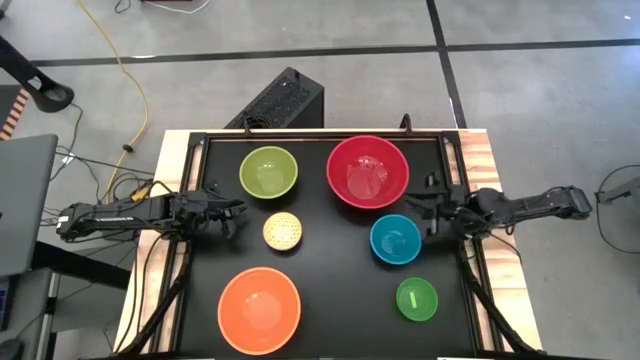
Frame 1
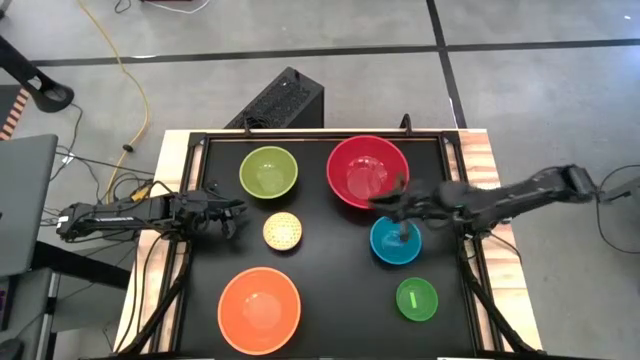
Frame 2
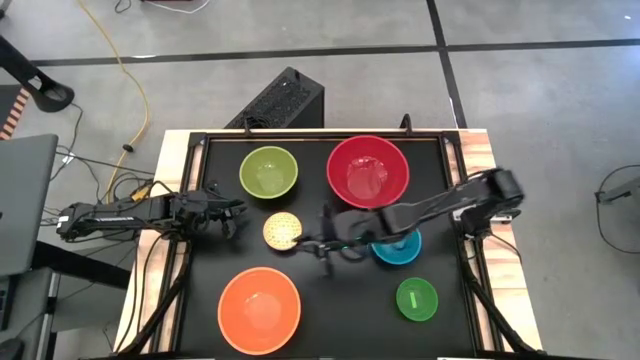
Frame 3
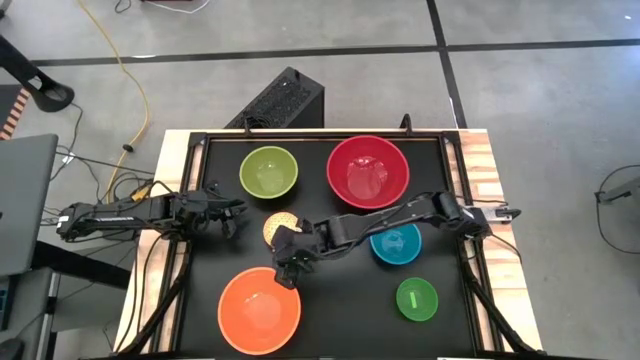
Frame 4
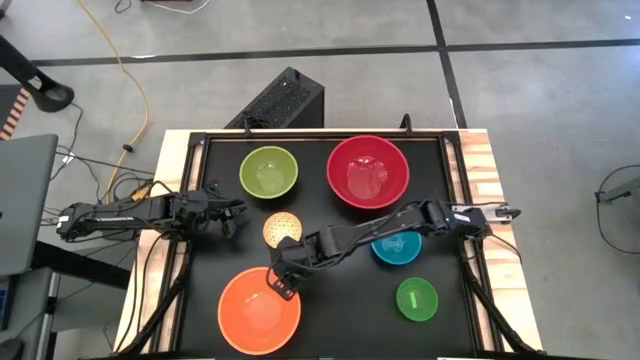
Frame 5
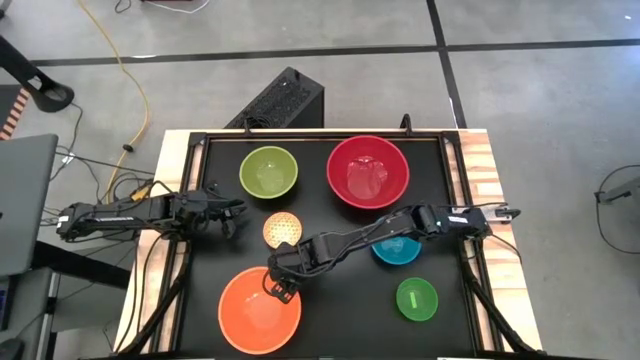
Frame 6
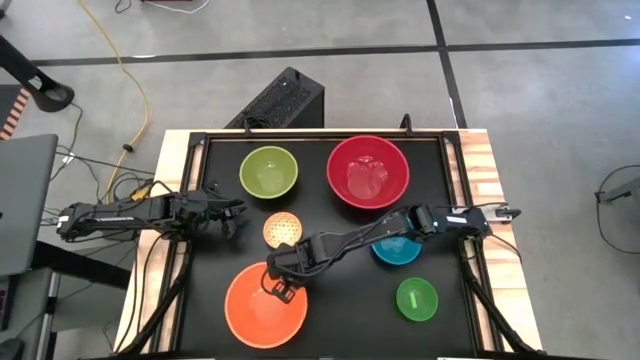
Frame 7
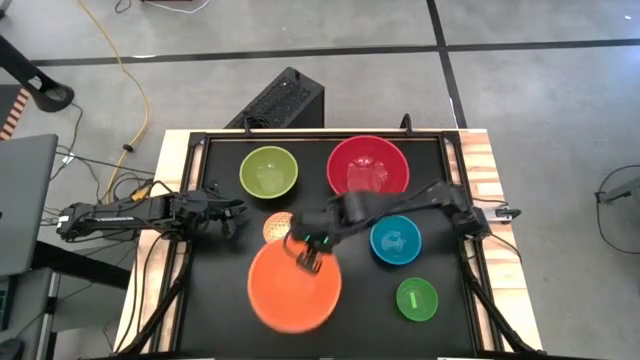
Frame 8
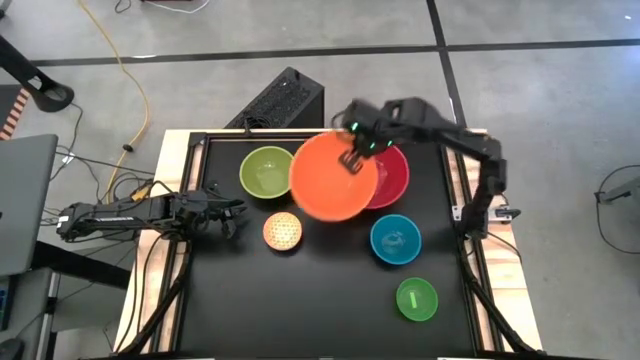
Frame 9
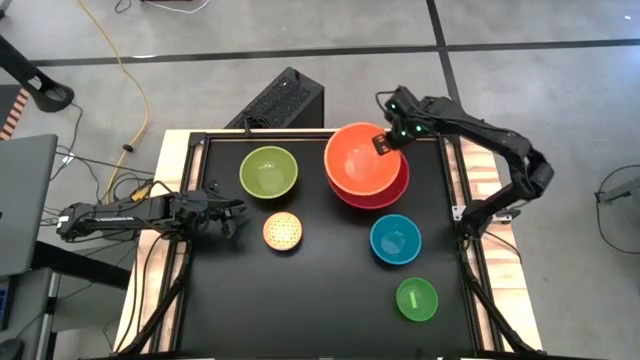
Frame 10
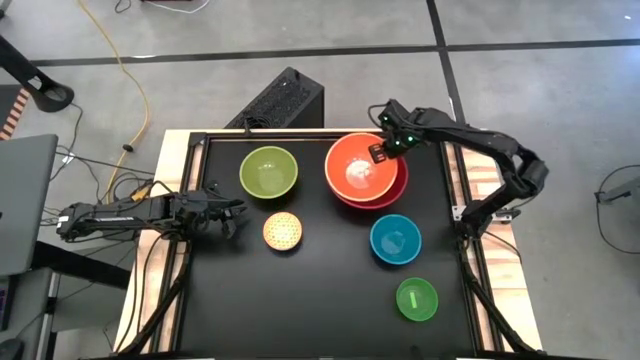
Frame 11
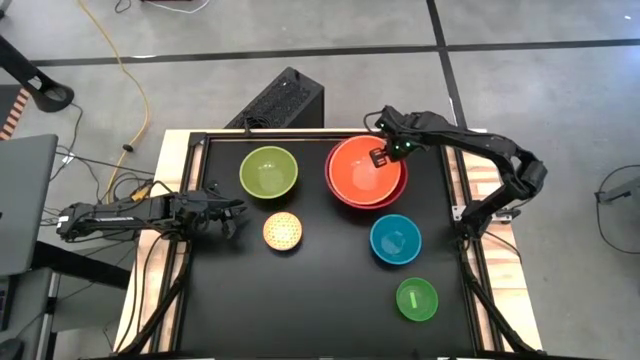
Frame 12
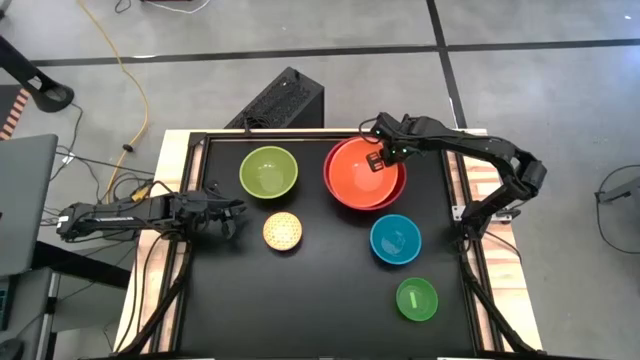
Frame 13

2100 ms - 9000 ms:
Stack the orange bowl on the red bowl

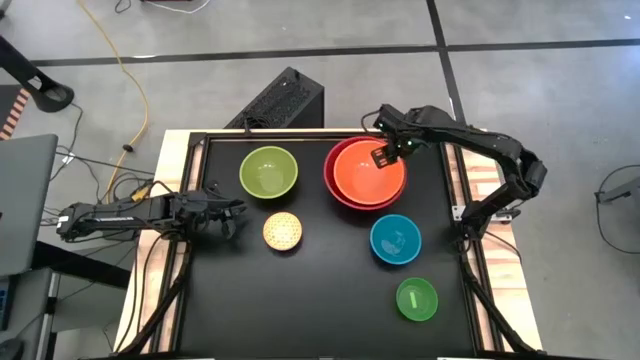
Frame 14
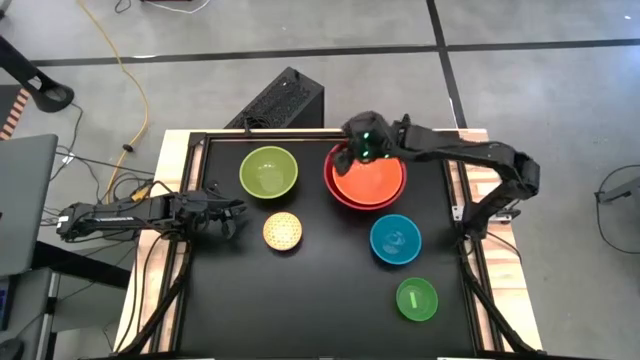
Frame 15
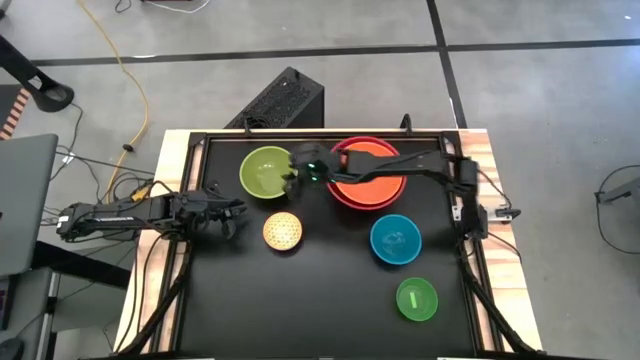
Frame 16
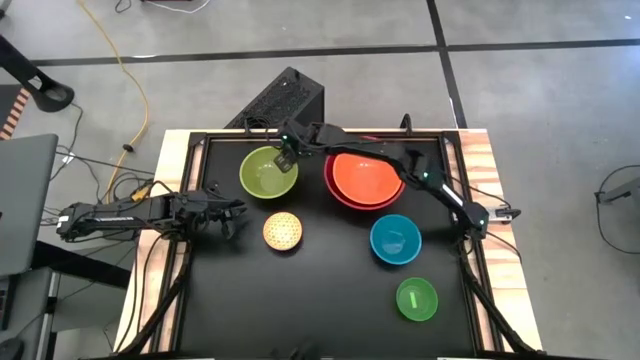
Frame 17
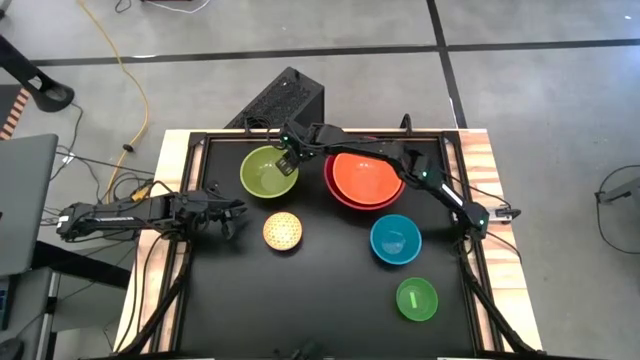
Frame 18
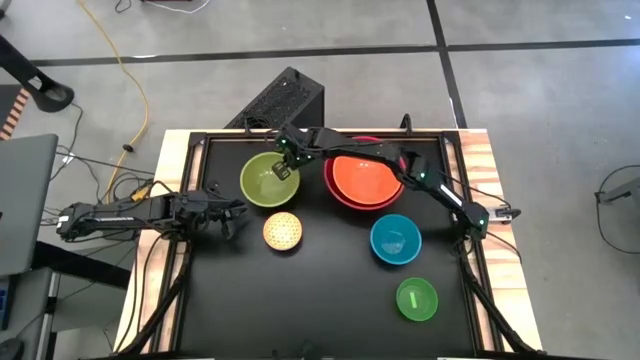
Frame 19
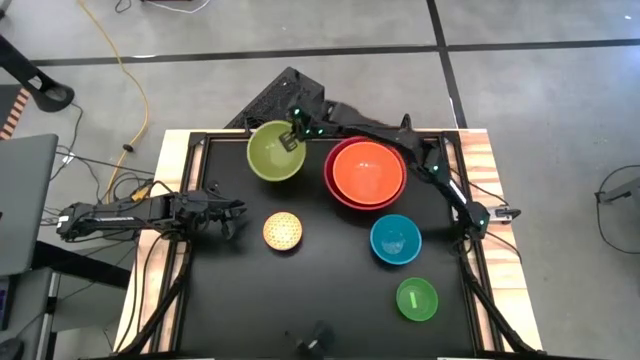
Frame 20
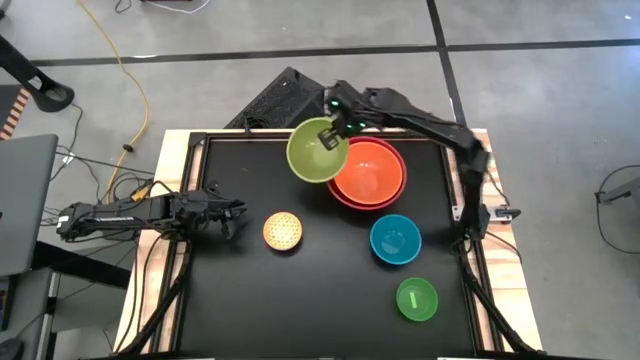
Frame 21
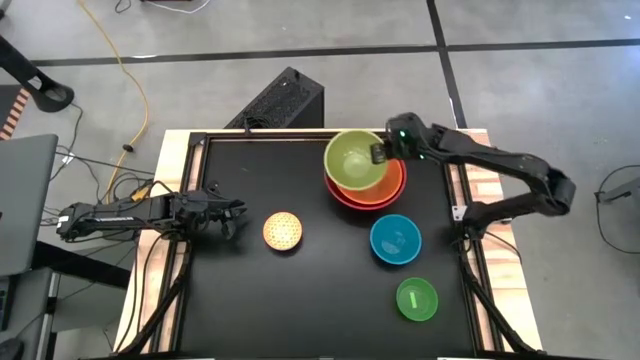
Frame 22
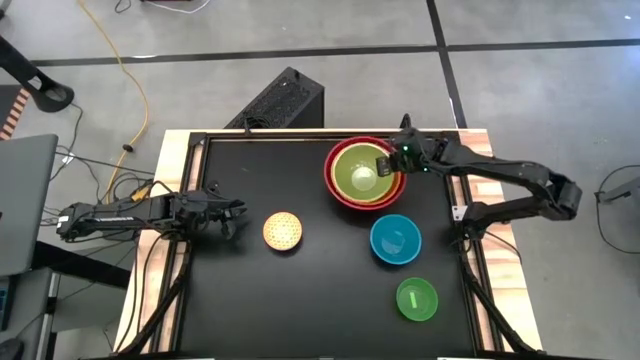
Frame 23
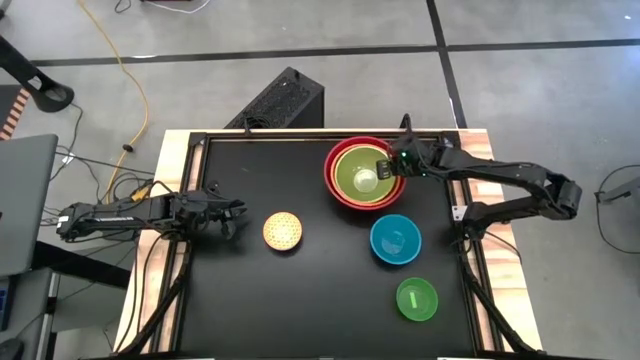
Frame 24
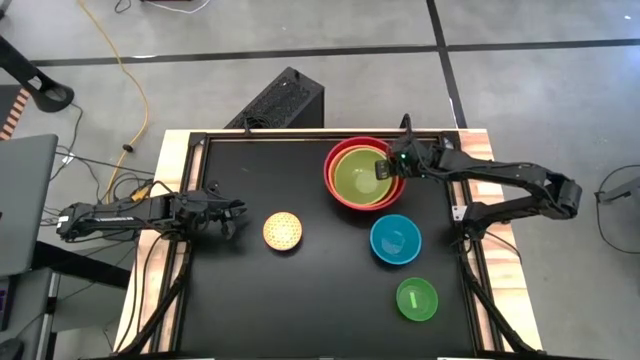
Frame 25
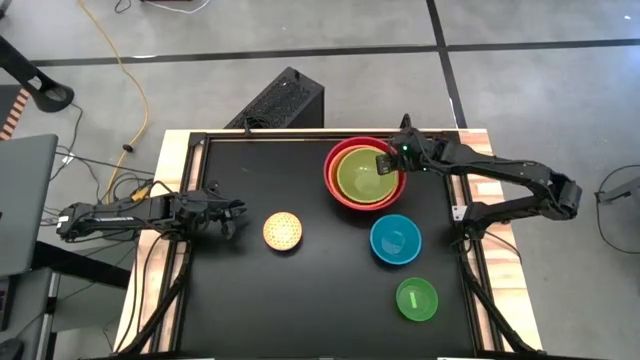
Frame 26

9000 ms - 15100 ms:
Stack the light green bowl on the orange bowl

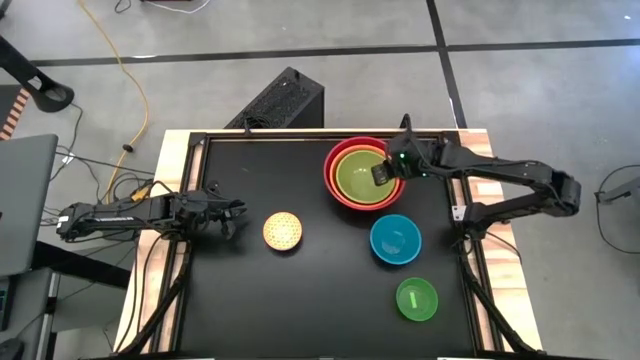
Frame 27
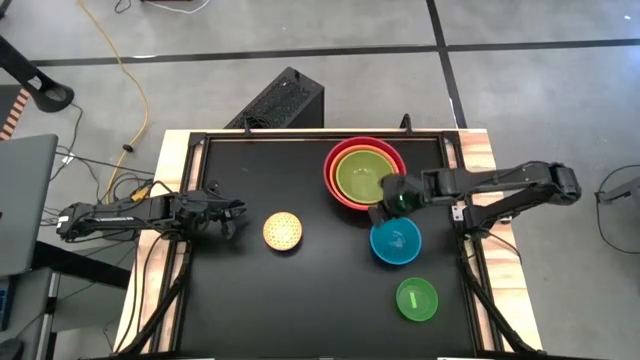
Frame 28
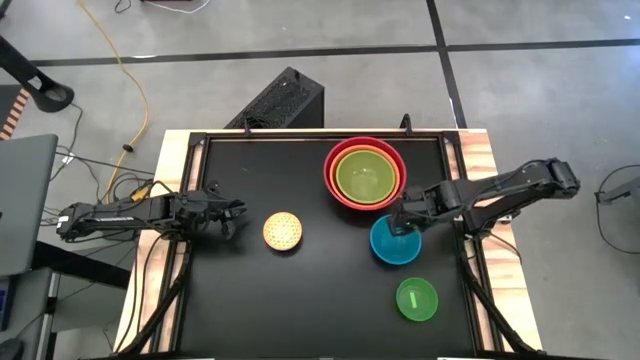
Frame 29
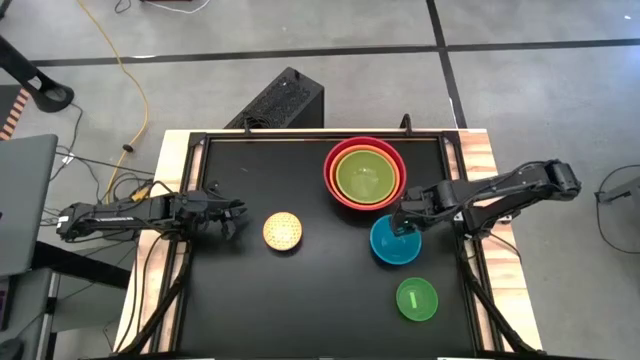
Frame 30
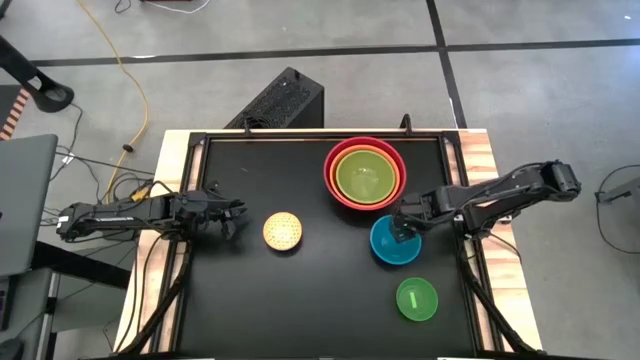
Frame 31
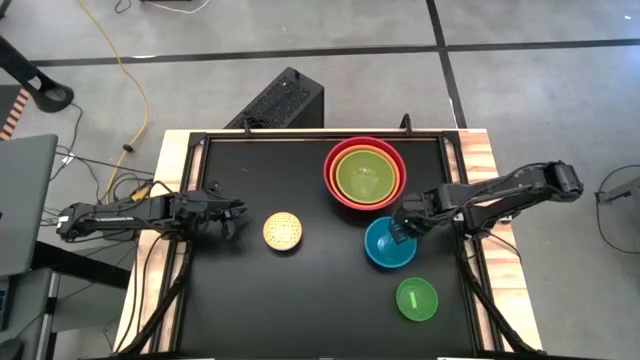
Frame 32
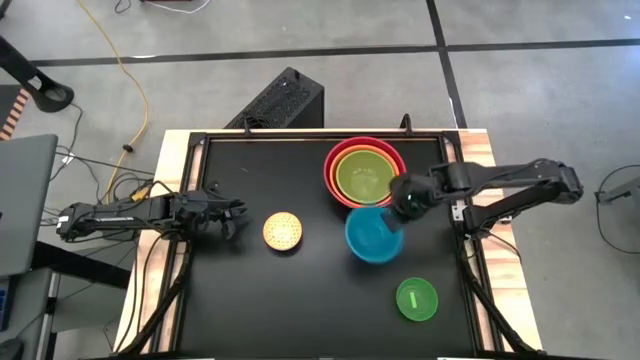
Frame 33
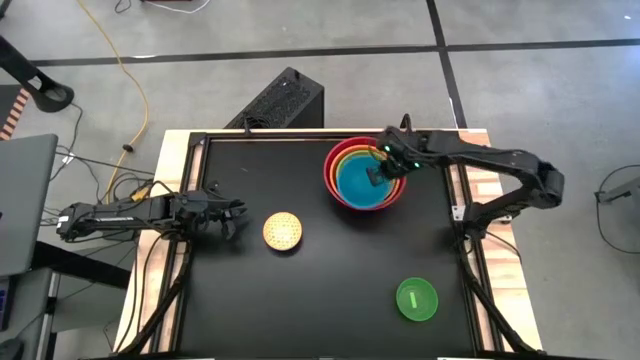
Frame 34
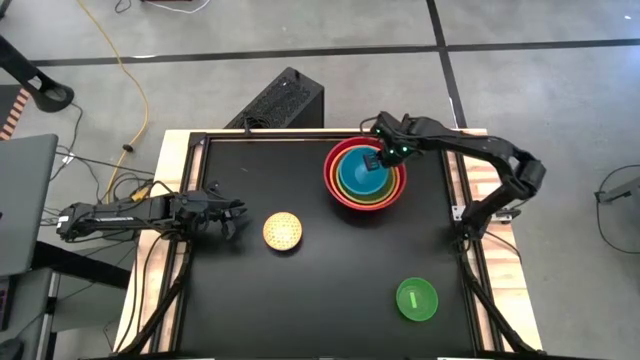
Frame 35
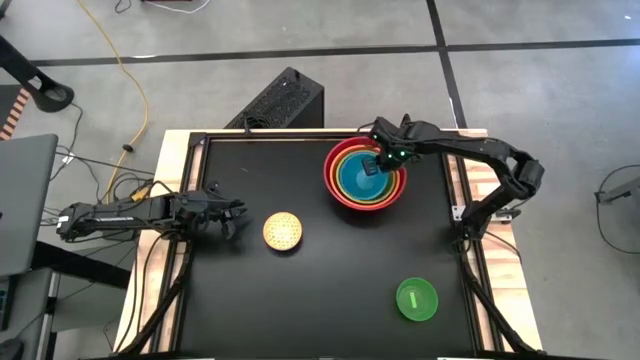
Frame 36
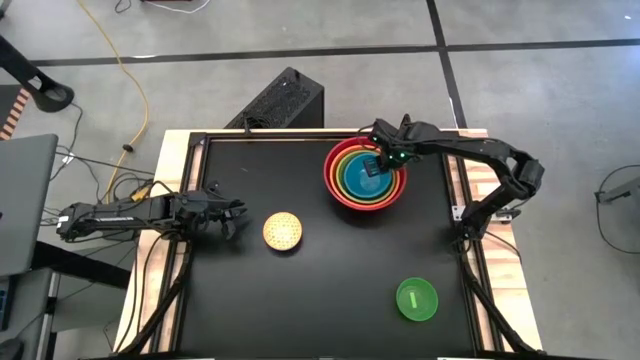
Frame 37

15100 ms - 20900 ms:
Stack the blue bowl on the light green bowl
